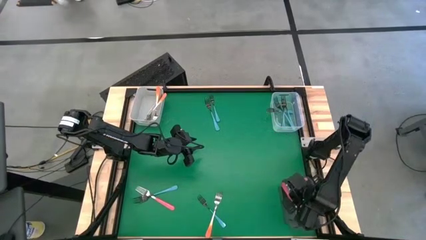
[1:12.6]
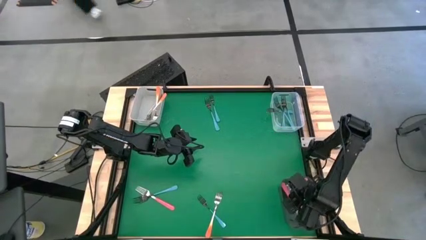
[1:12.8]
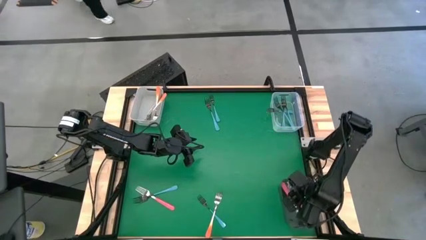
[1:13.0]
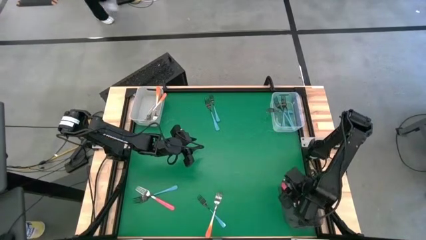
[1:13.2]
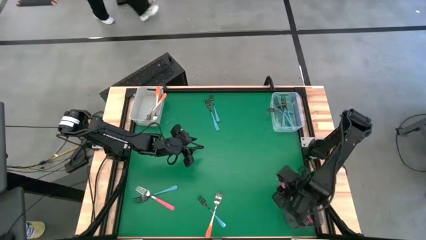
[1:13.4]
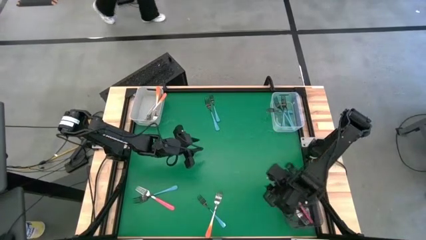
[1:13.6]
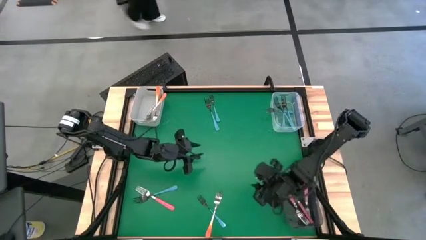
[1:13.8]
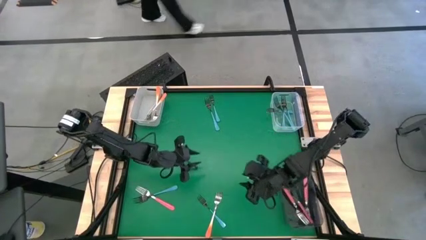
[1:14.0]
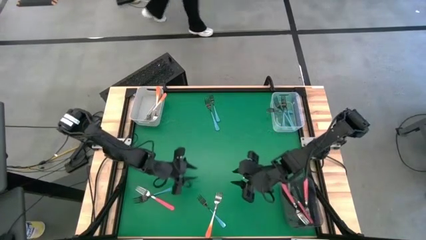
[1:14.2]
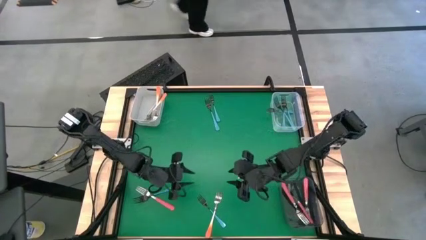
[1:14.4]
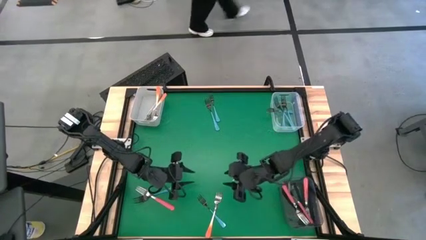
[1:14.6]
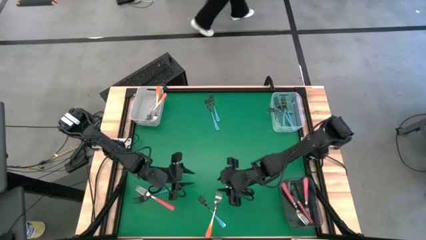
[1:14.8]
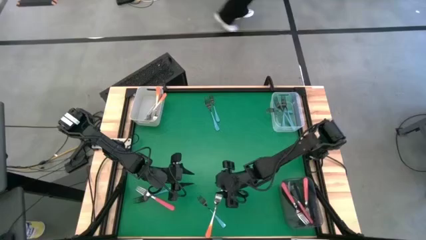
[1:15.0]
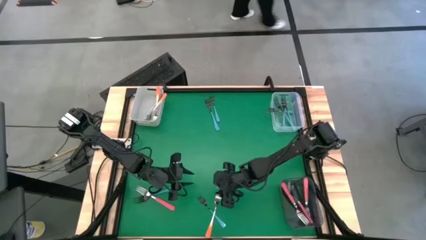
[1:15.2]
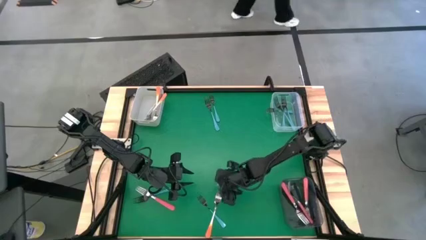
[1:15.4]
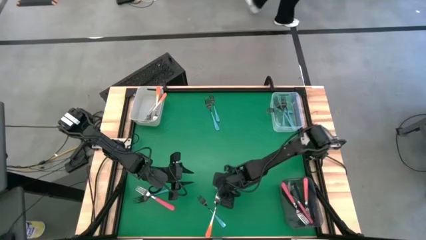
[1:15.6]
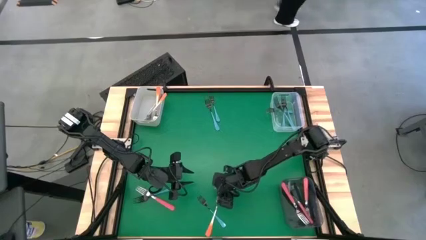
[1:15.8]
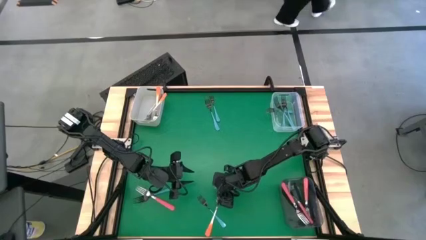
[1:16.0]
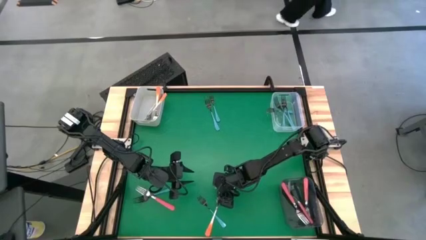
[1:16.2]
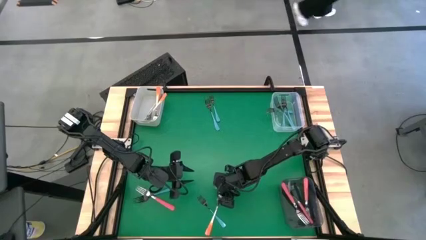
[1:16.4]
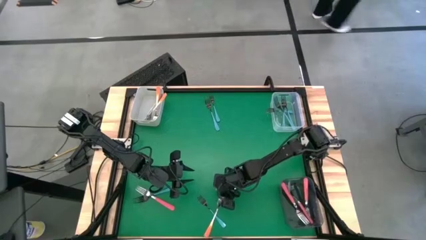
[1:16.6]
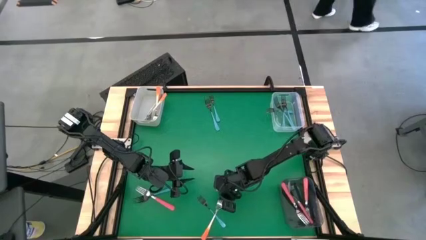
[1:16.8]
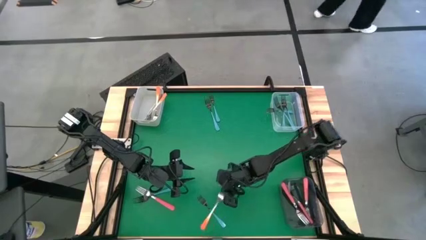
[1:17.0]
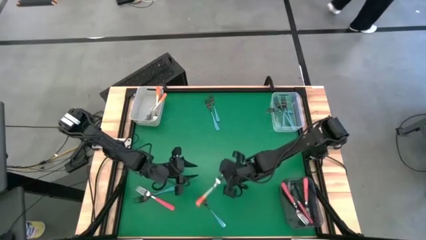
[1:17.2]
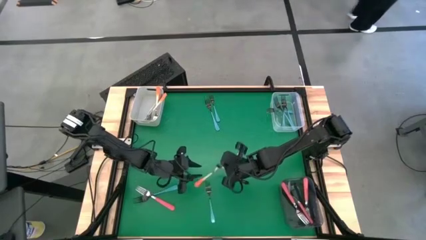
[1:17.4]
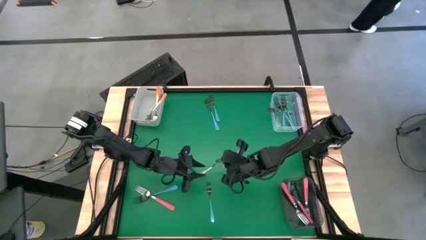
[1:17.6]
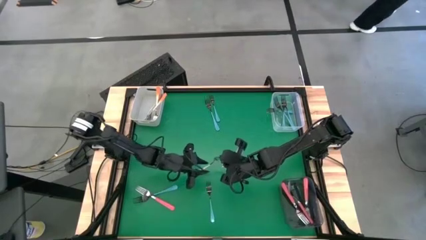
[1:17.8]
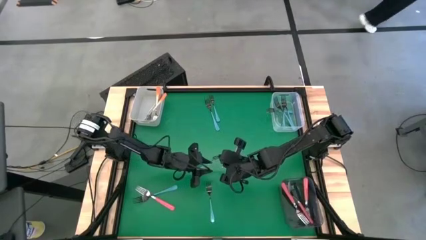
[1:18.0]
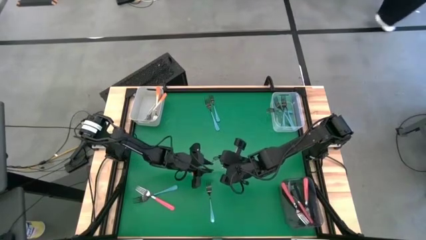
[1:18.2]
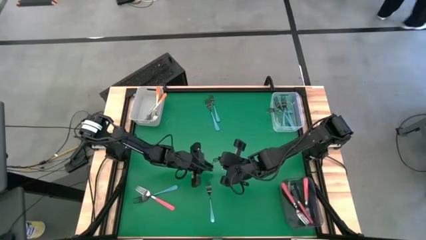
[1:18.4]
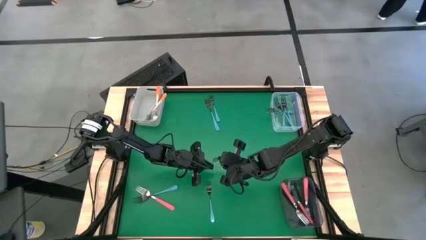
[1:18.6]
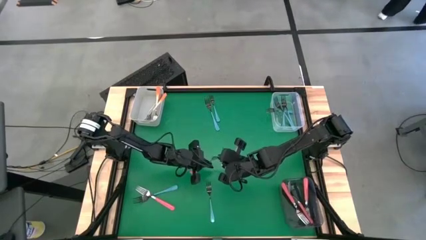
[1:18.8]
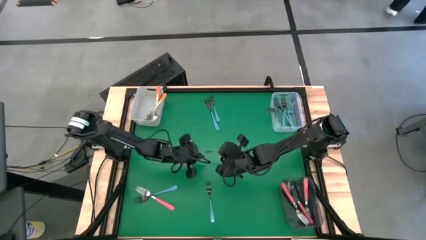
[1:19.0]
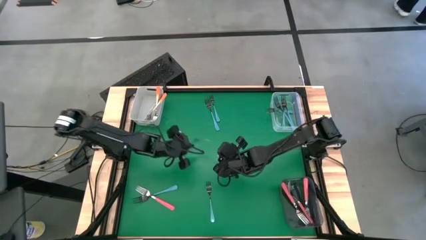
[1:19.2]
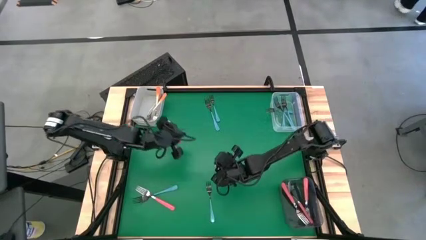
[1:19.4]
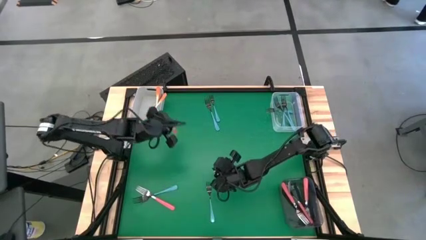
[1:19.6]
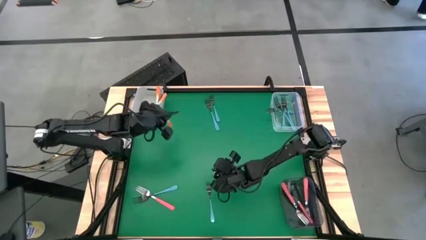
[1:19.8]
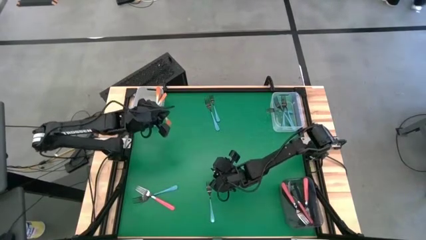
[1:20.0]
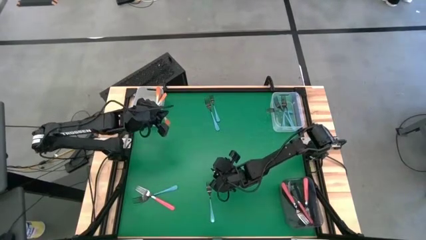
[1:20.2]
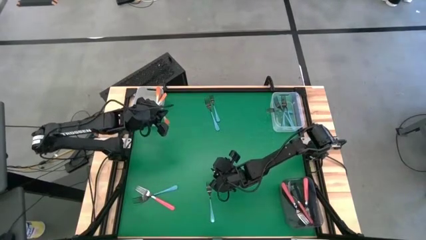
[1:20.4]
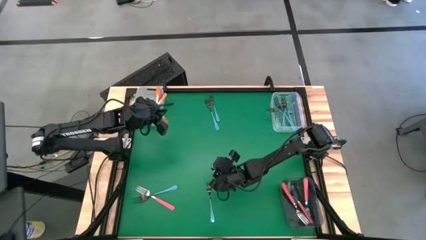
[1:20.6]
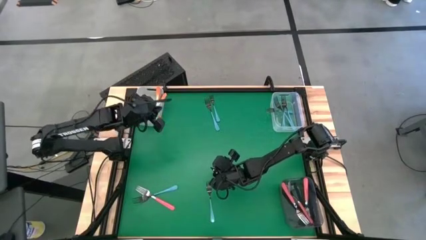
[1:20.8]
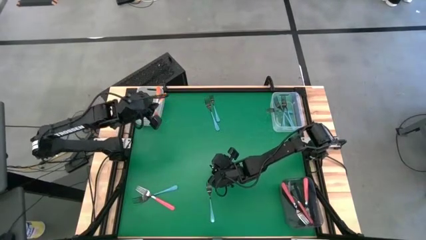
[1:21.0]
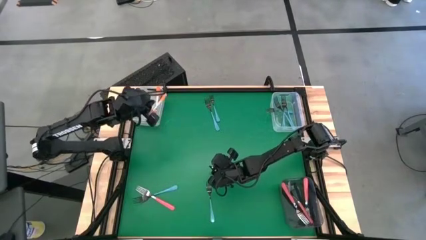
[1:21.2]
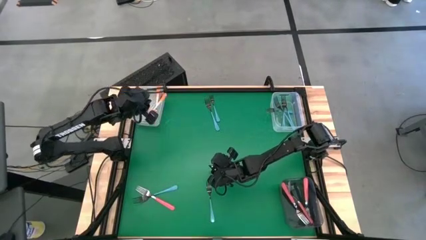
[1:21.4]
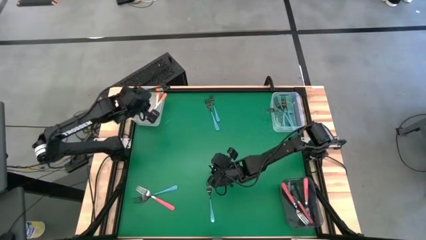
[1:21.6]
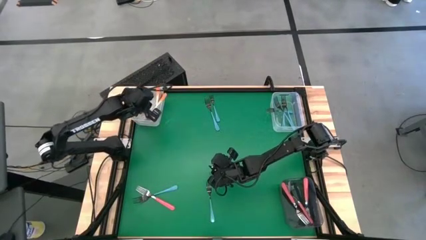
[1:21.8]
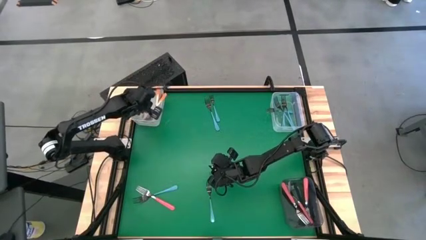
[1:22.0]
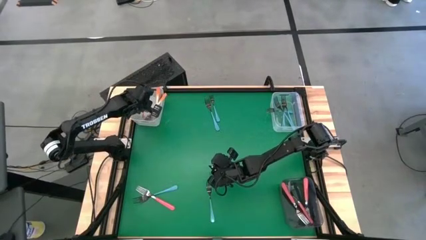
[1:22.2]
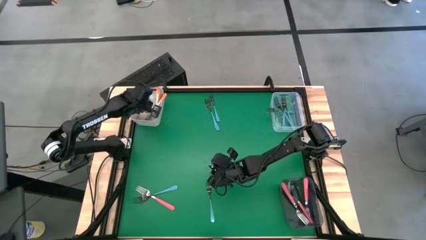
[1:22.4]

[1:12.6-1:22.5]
Task: Sort silverware by color (type)
Put the orange fork into the white bin
